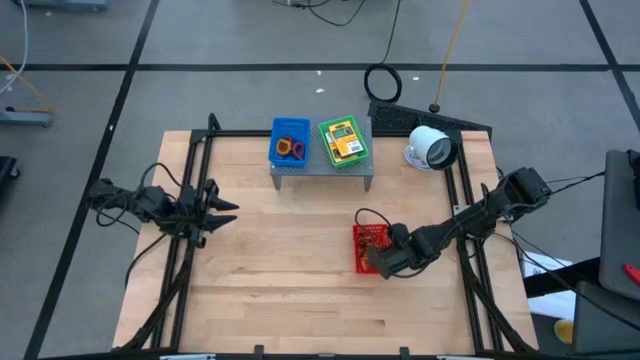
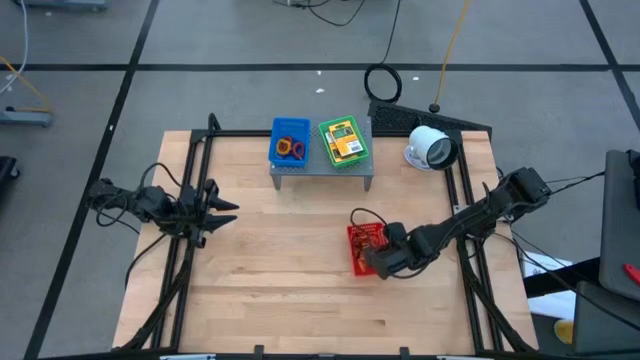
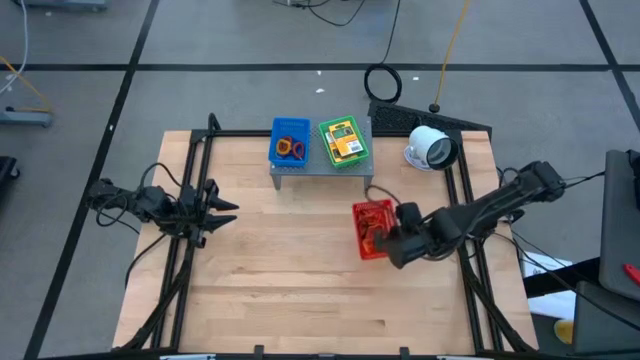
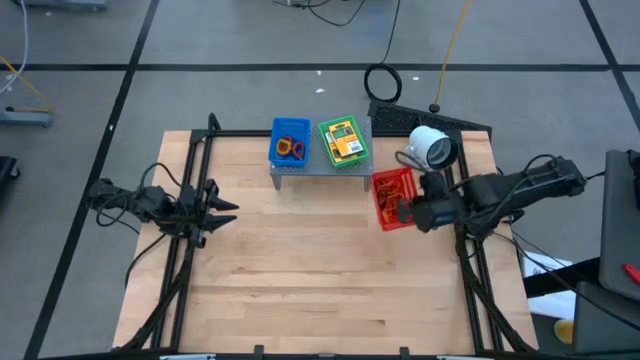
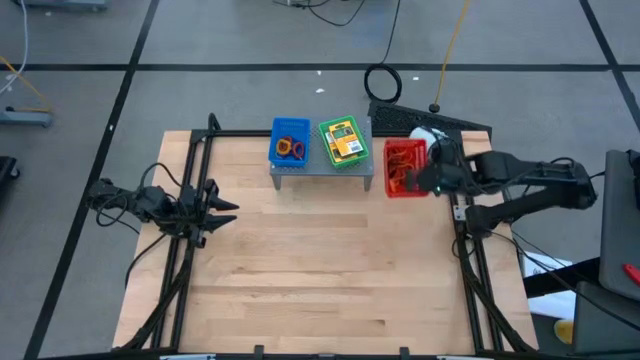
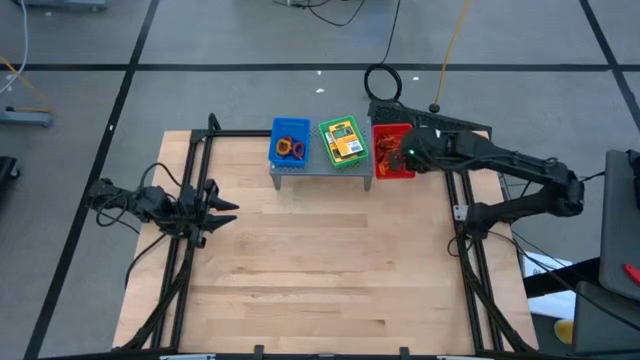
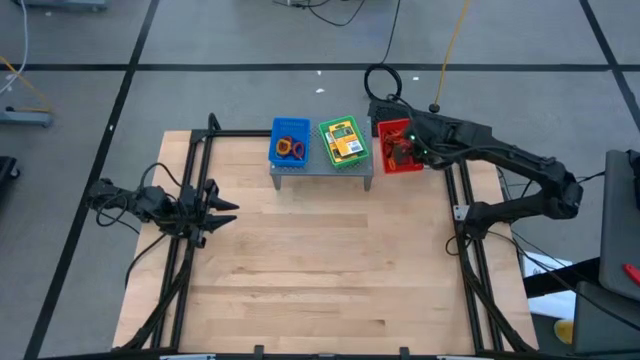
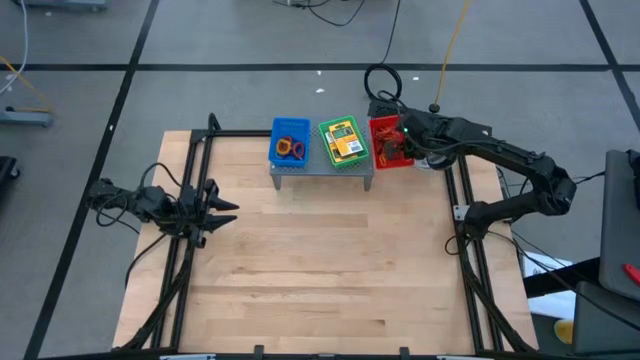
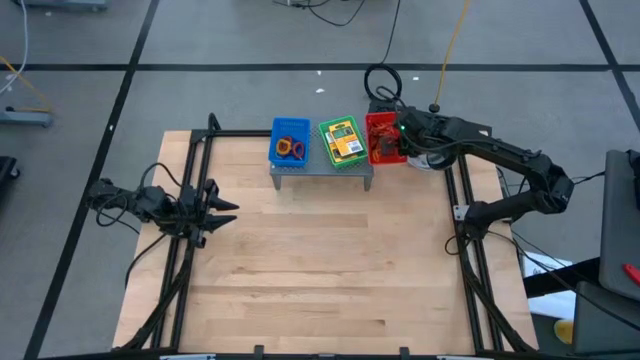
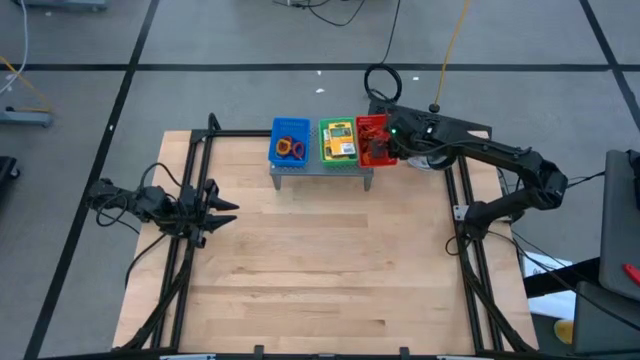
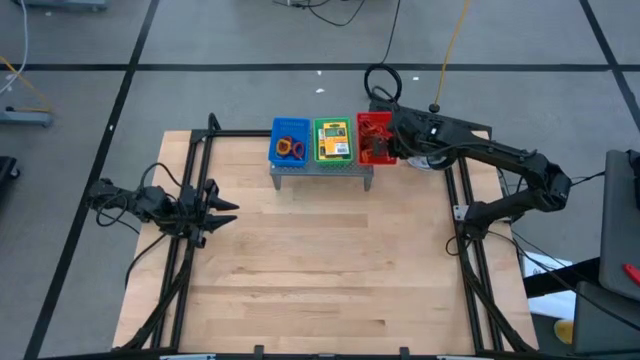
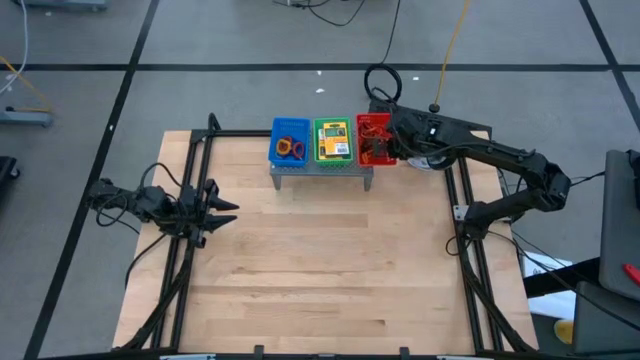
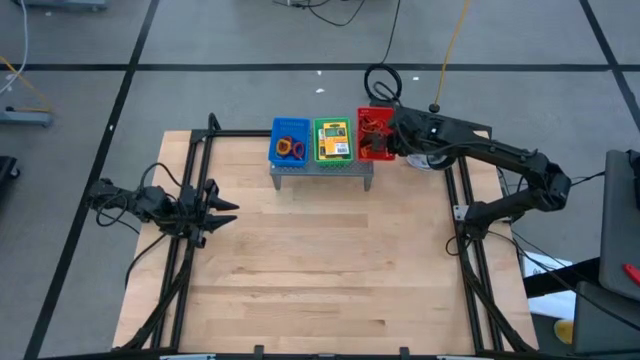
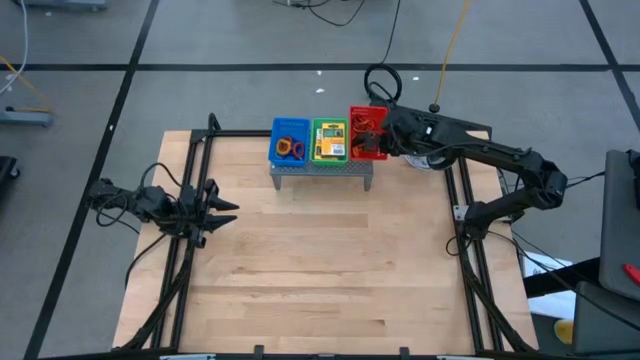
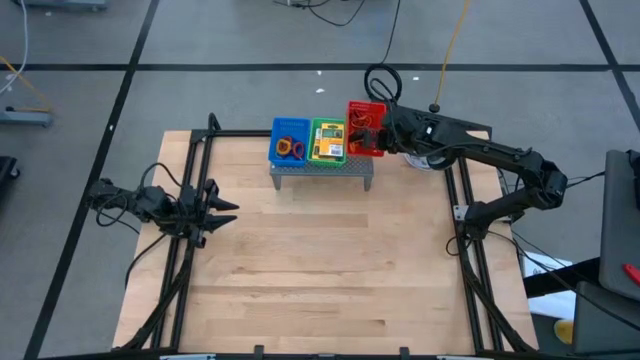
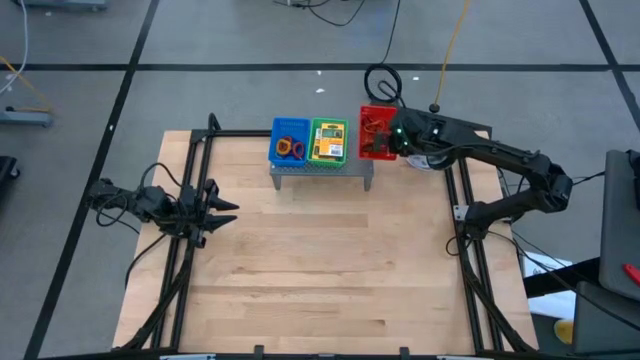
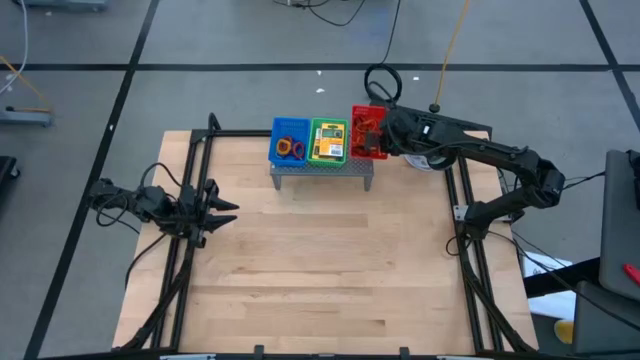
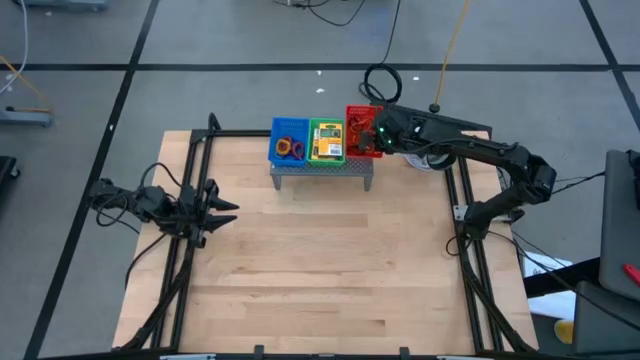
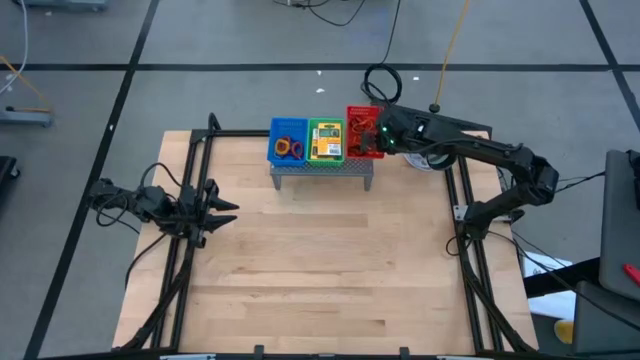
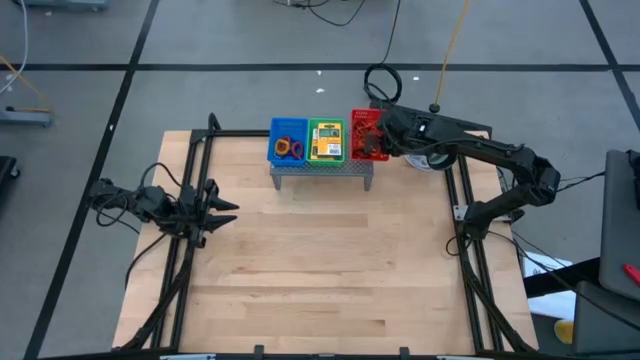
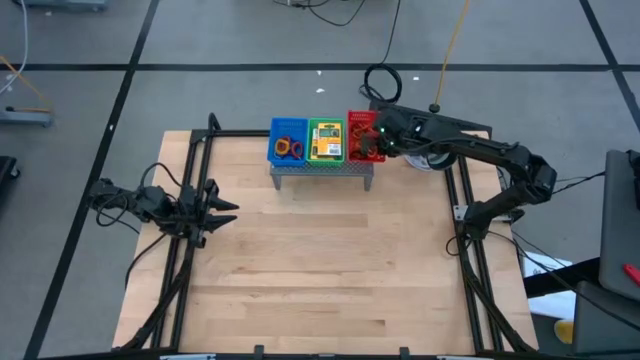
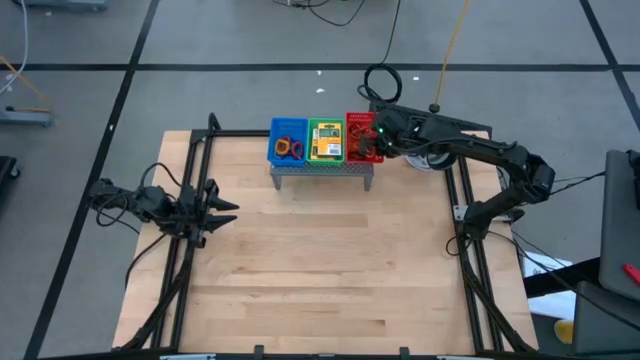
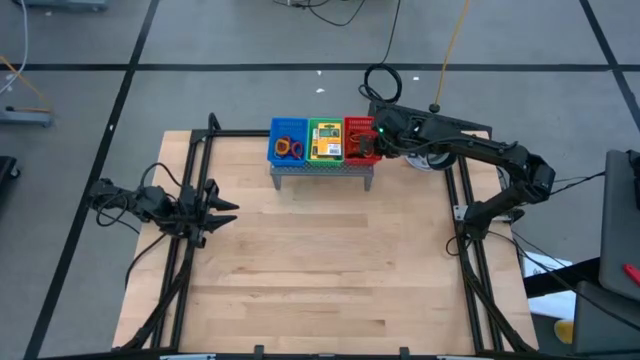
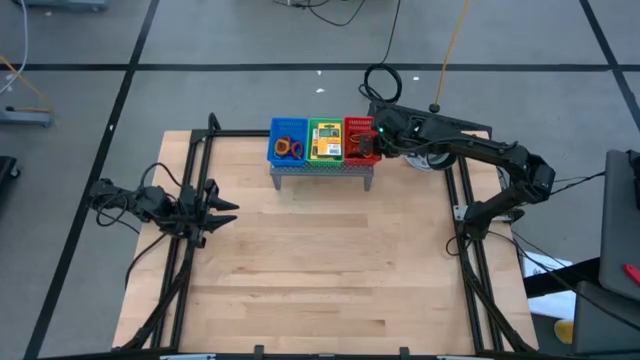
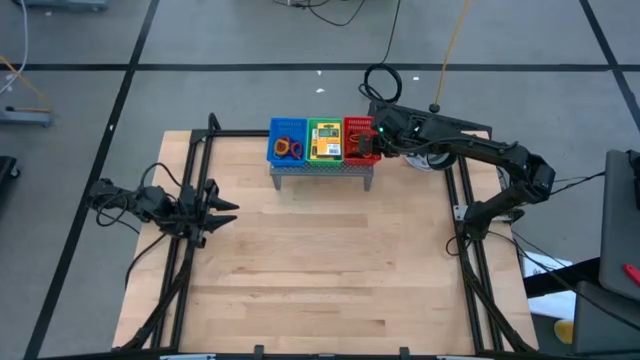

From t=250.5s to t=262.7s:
Task: Pick & Place Office Desk Supplies
Put the red bin on the shelf

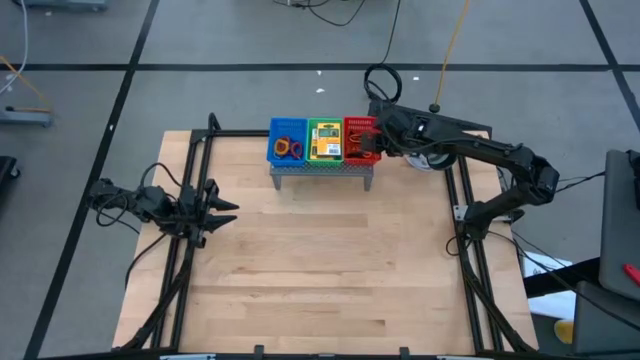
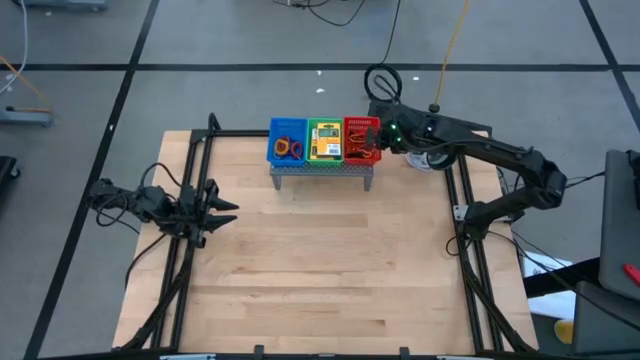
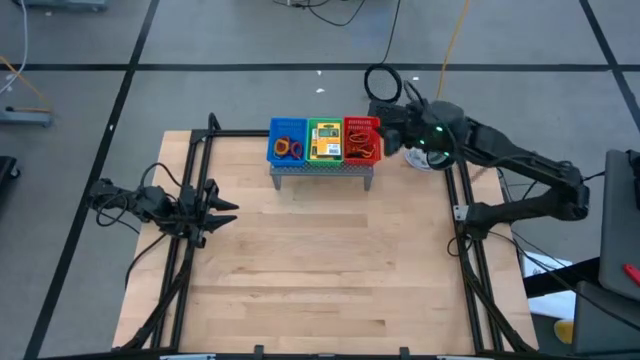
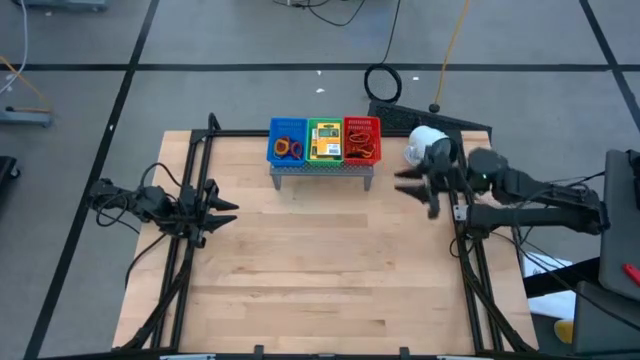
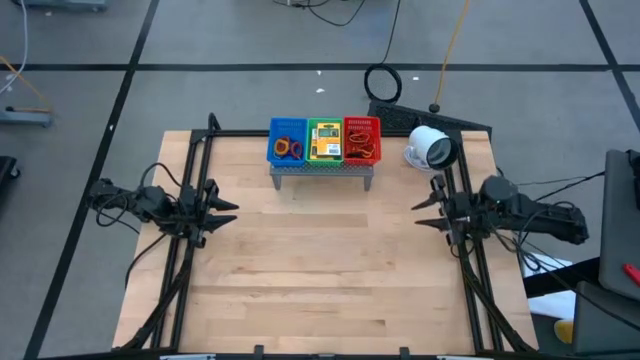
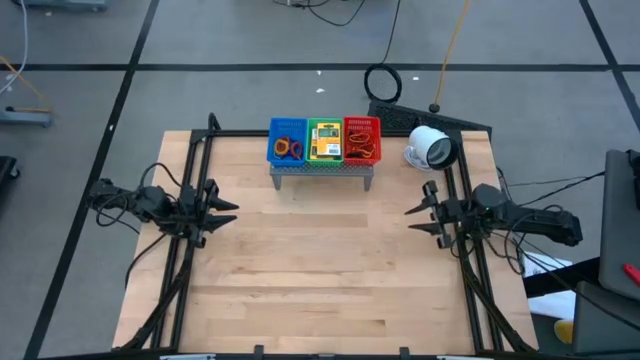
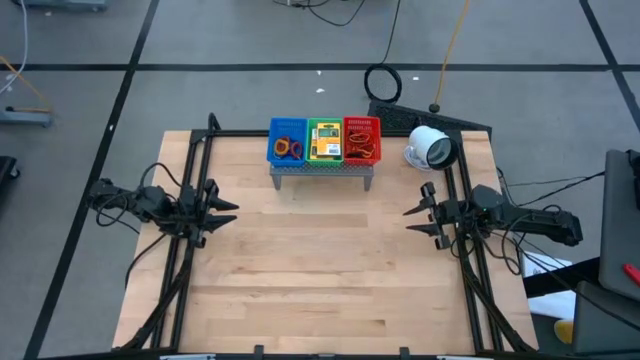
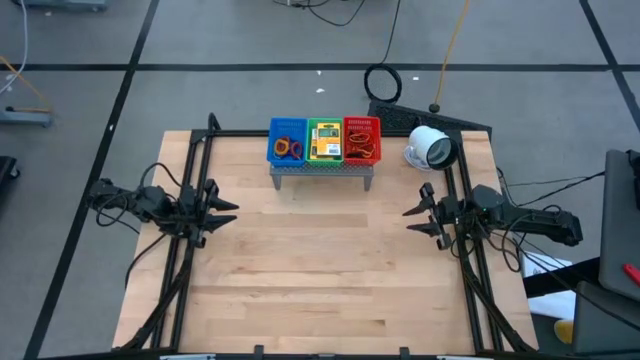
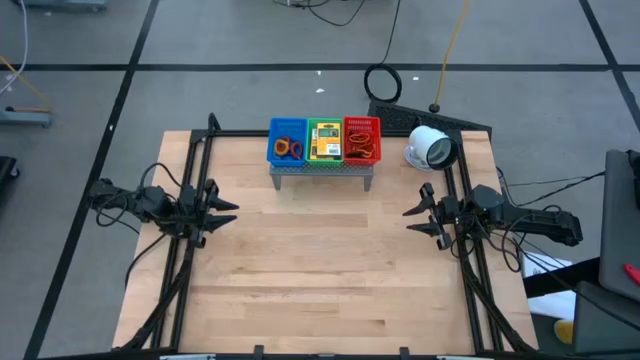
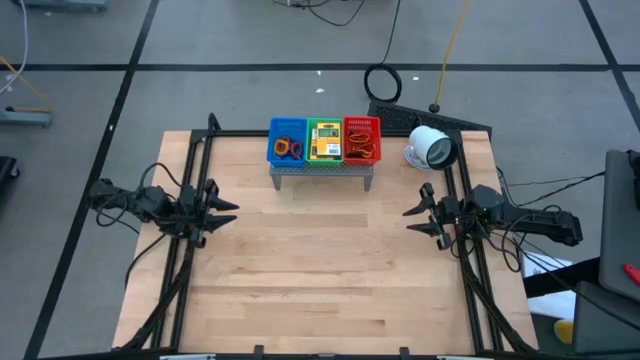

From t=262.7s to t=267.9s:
Return to Home Position

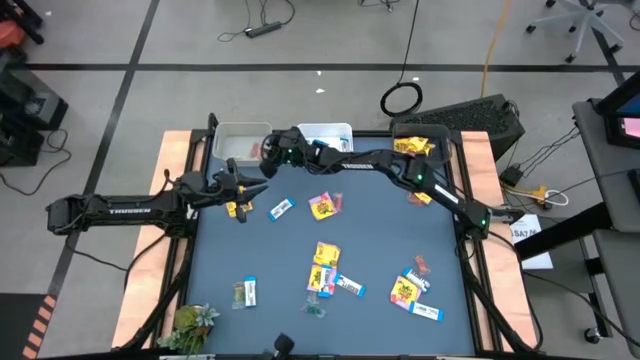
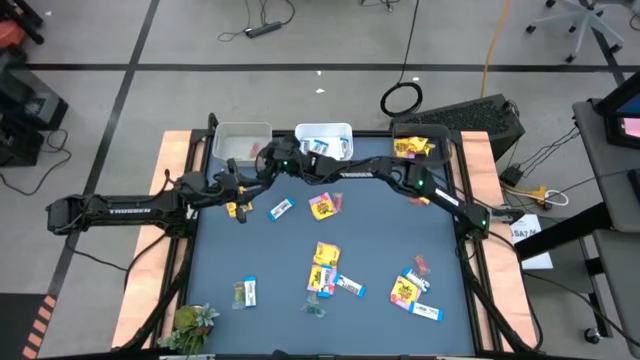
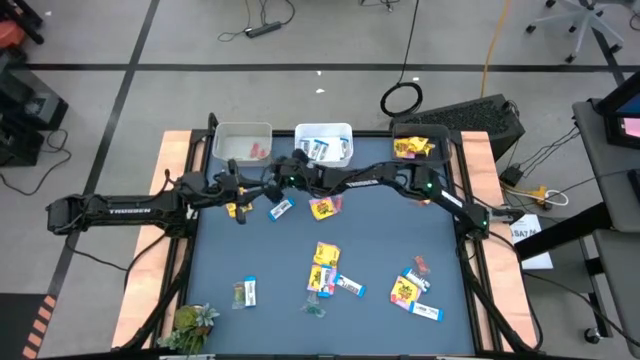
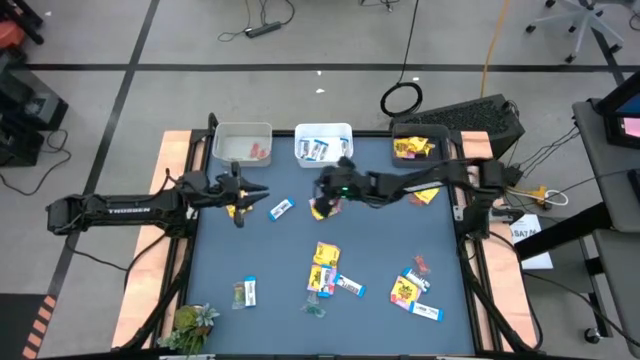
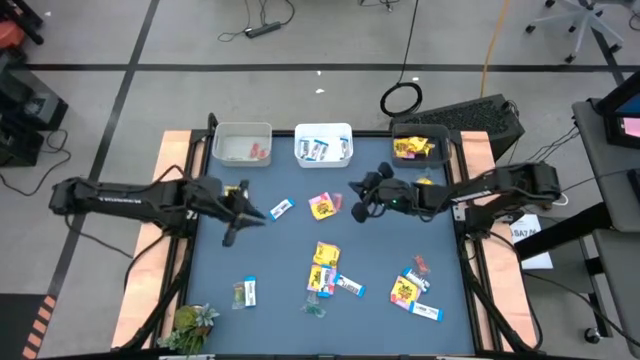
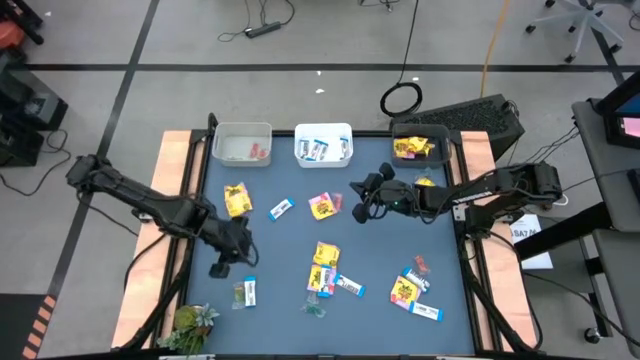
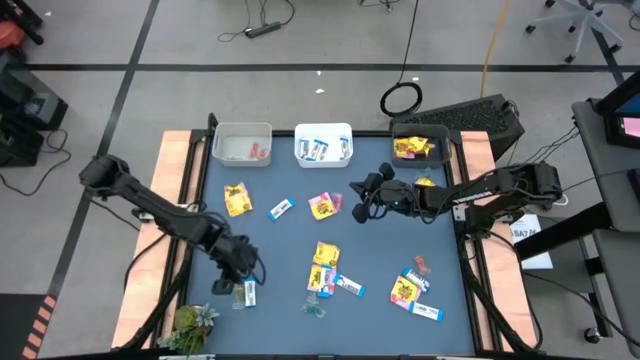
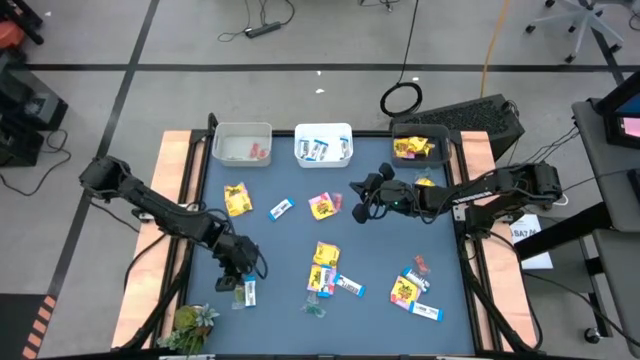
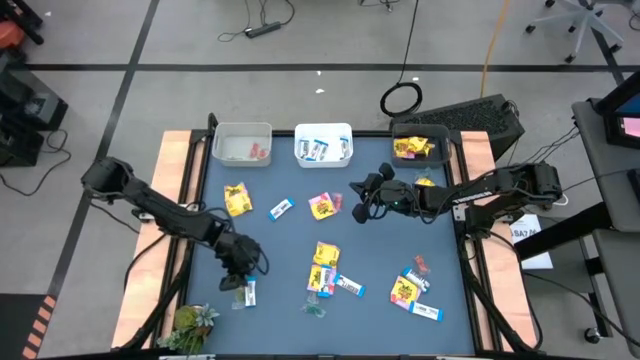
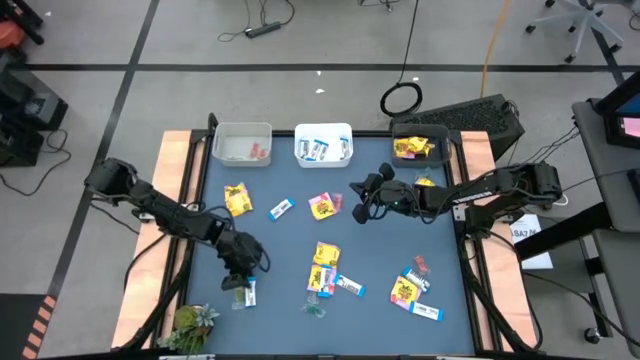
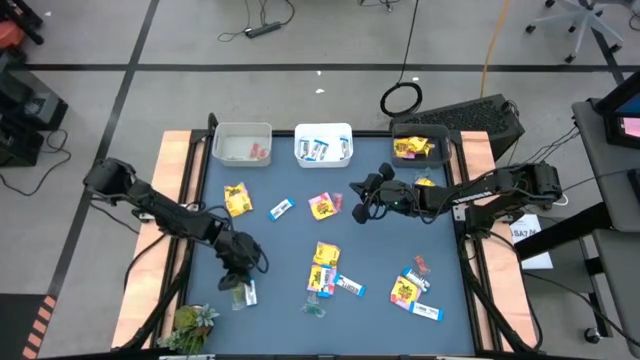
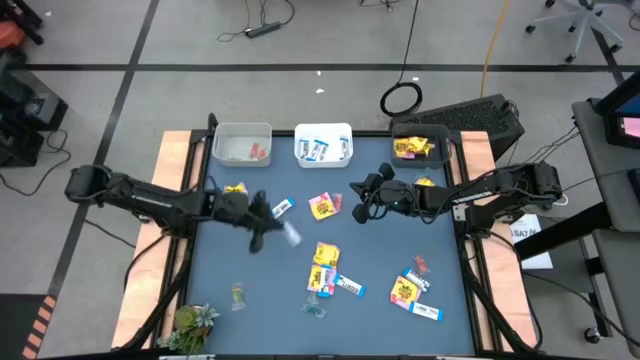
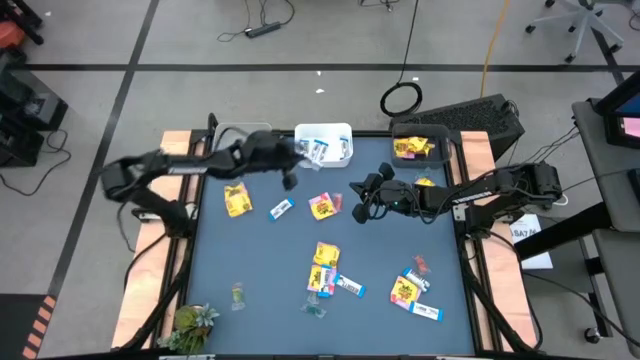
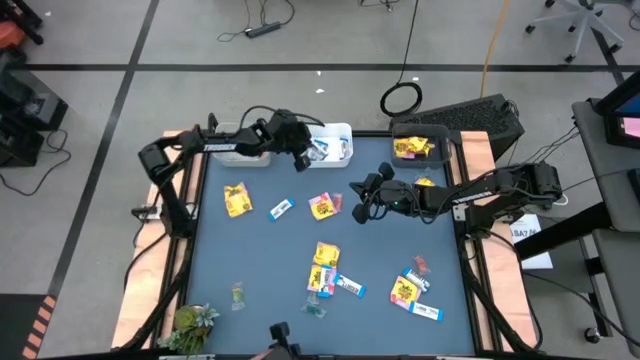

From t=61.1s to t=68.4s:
Task: Sort candy
Put the white chocolate into the white bin
